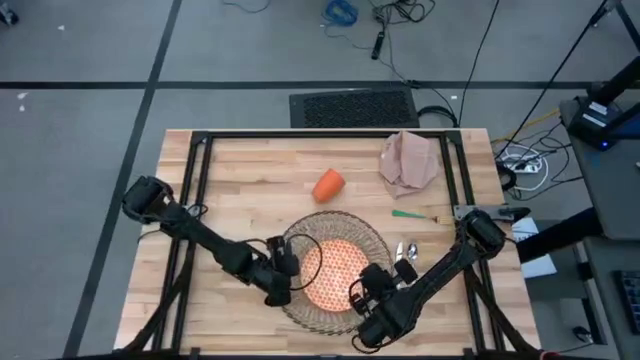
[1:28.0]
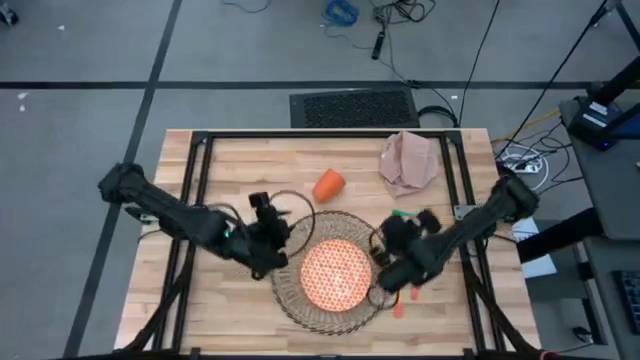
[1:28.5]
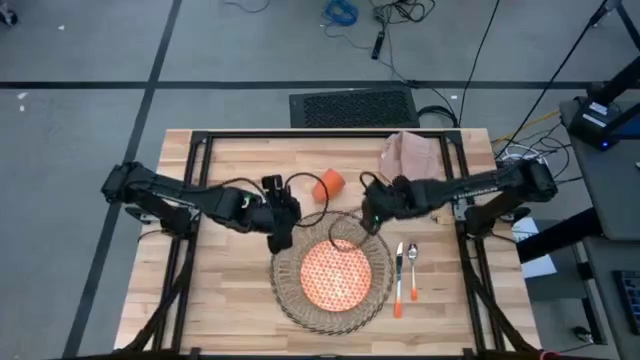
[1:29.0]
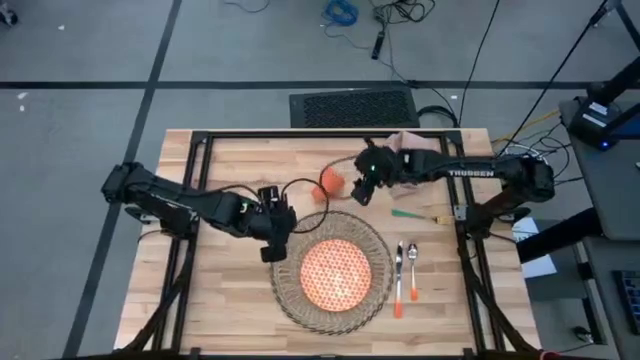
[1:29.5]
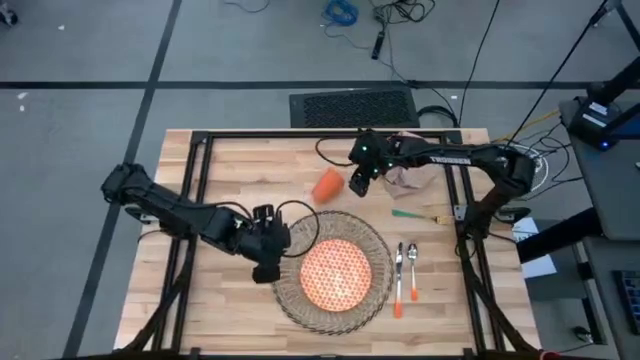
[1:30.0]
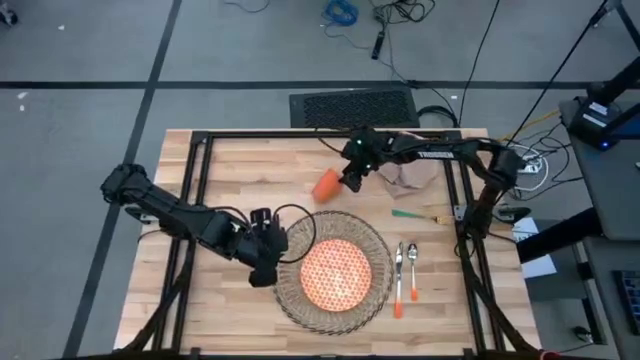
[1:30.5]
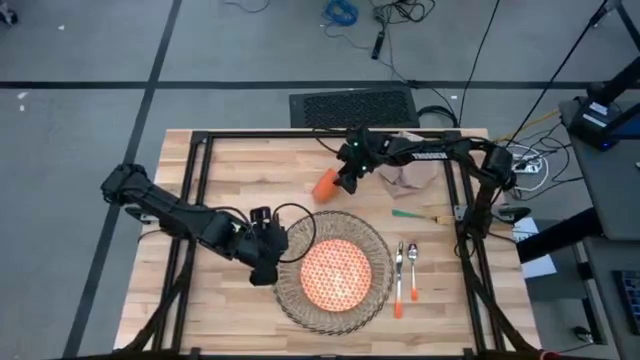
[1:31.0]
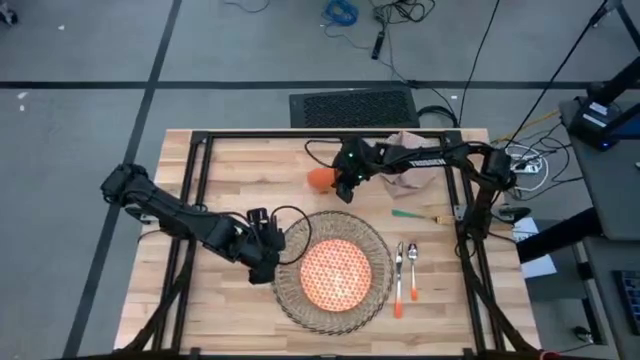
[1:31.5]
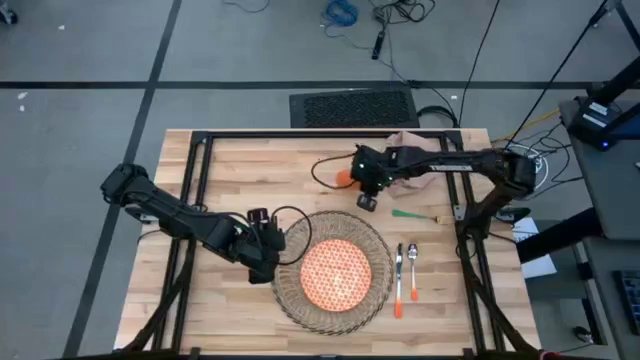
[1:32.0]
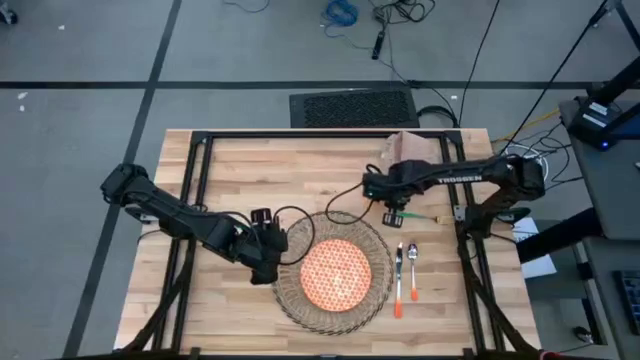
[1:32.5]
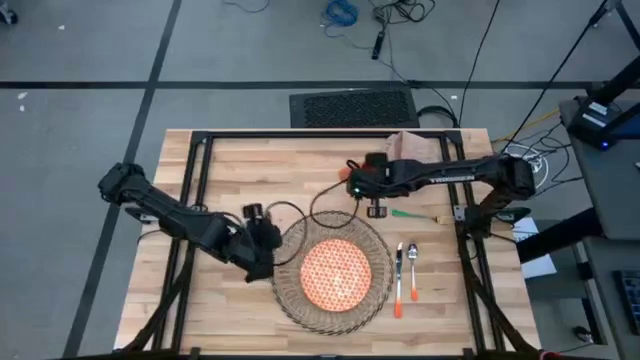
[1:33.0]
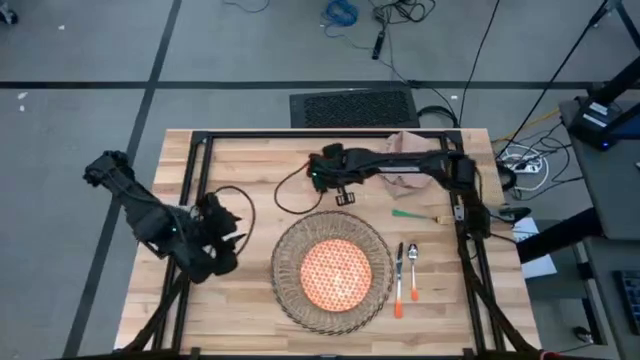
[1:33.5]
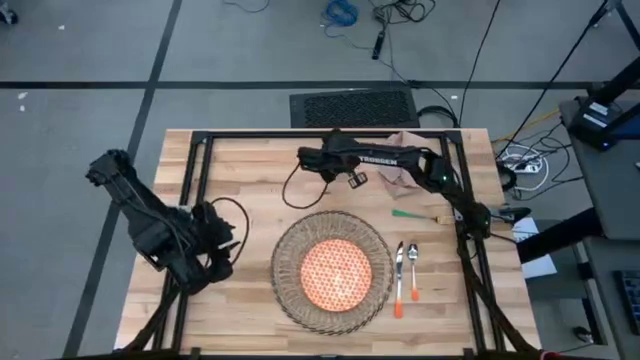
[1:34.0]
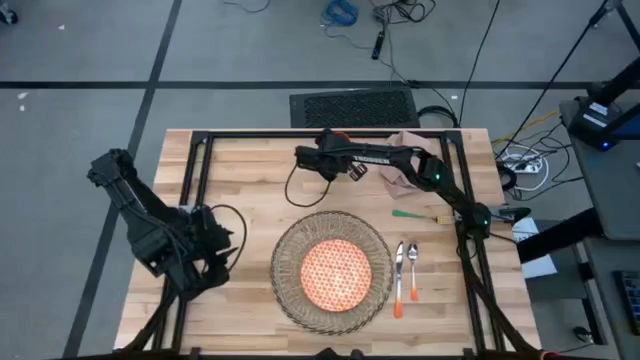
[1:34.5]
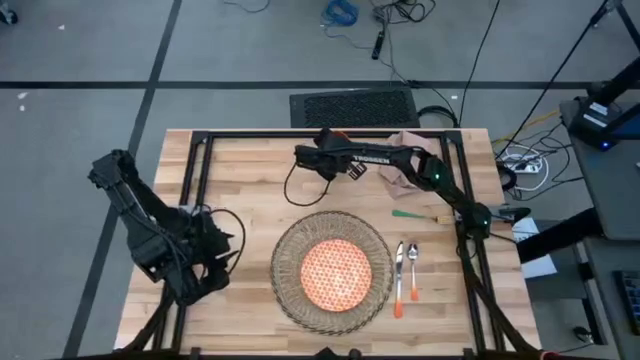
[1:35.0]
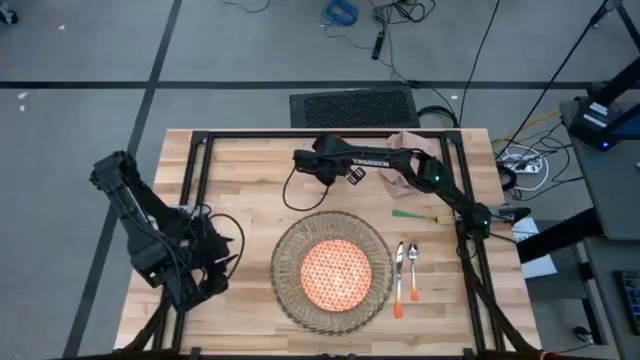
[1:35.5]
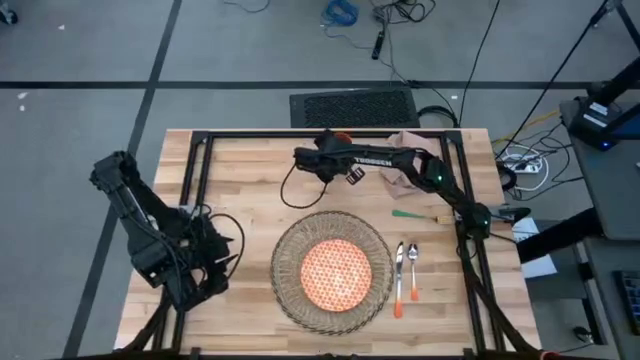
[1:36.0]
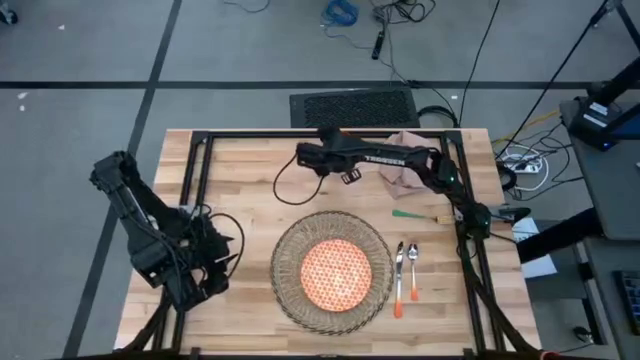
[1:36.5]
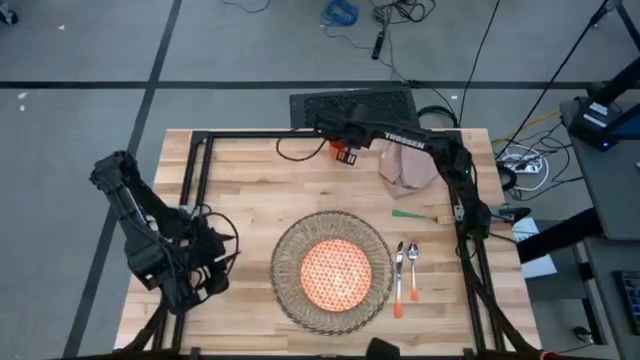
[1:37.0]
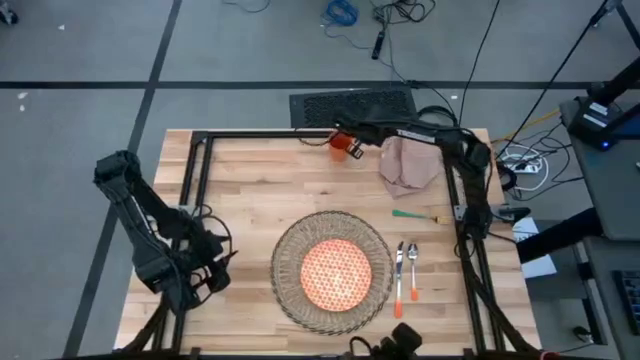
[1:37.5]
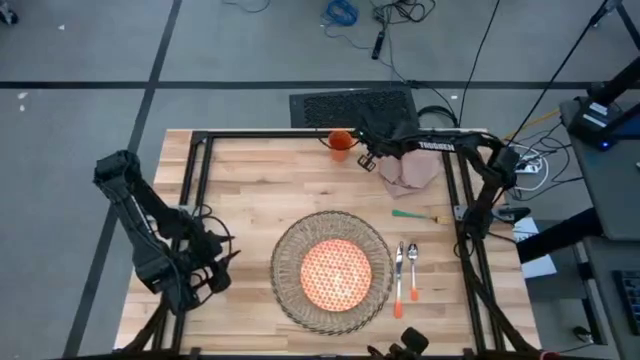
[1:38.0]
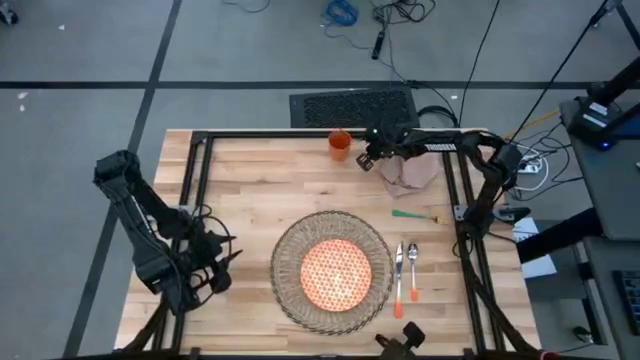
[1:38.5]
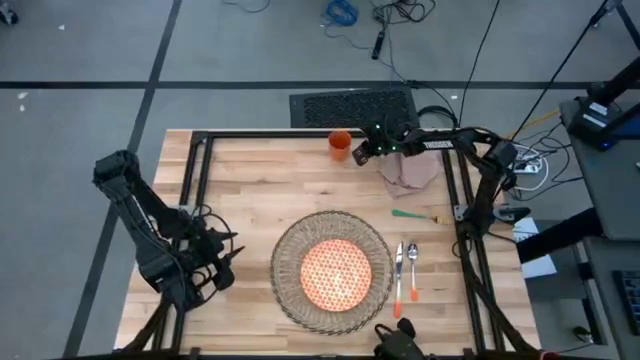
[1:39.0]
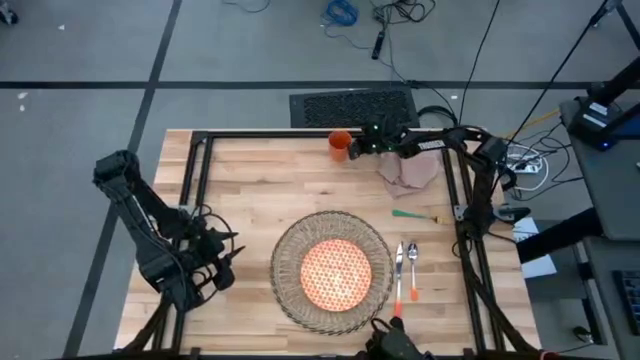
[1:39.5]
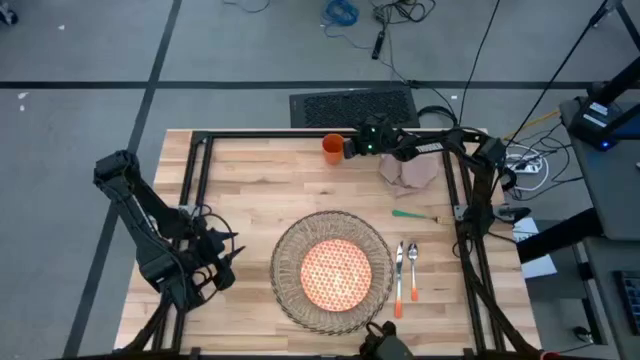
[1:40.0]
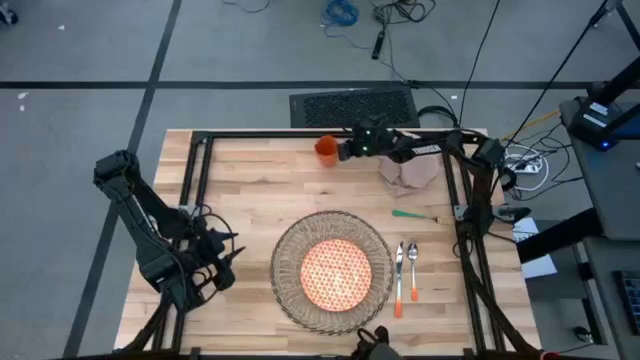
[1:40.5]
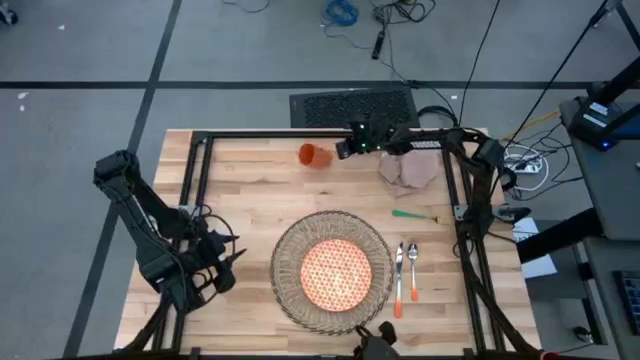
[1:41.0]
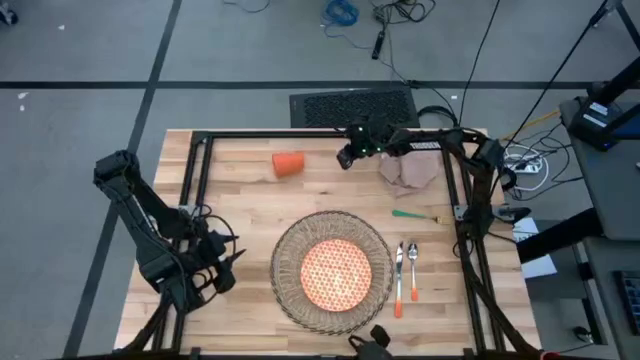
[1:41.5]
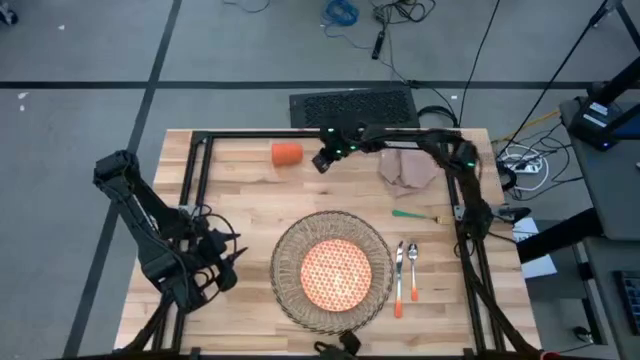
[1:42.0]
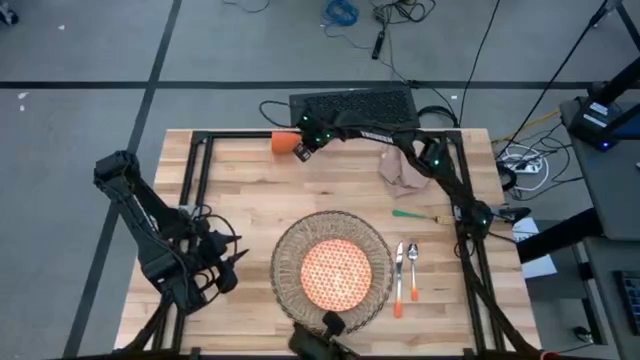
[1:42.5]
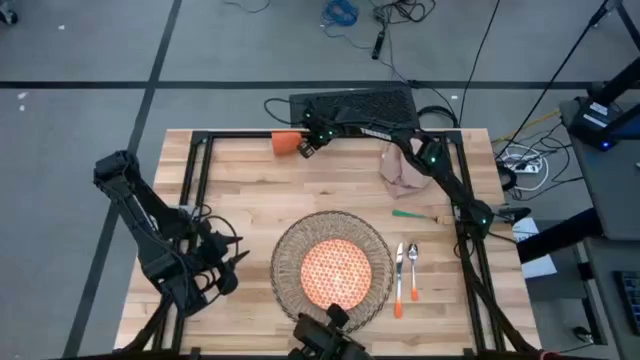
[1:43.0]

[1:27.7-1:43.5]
Task: Set table place
Move the orange cup to the top center of the table

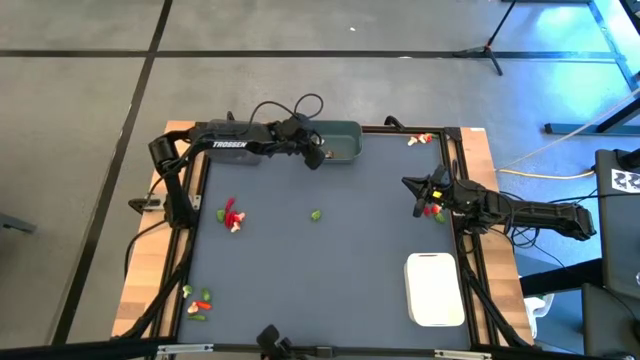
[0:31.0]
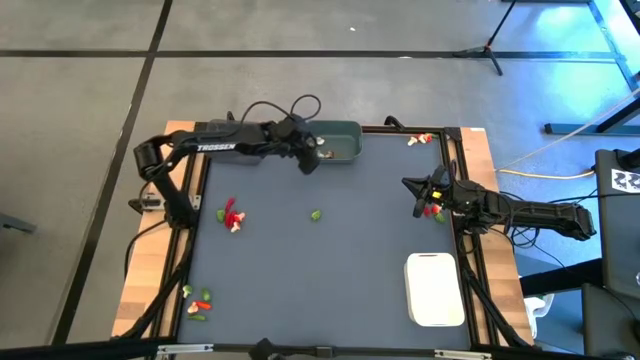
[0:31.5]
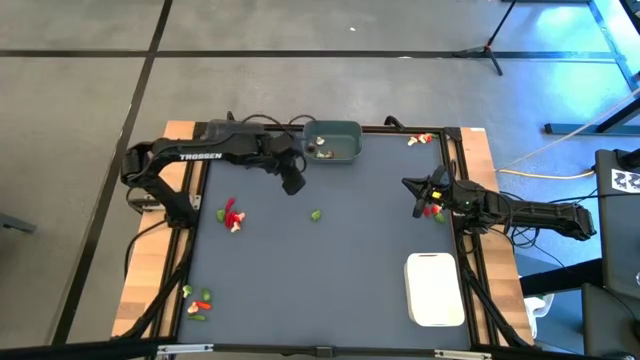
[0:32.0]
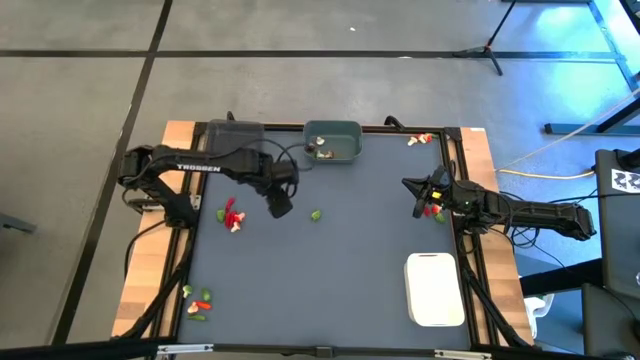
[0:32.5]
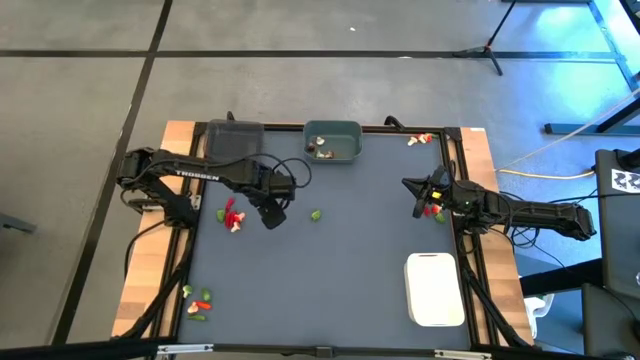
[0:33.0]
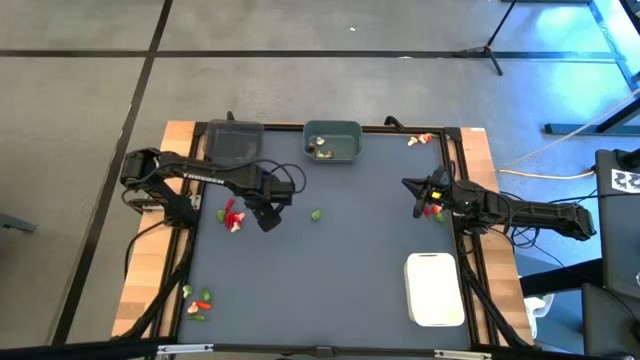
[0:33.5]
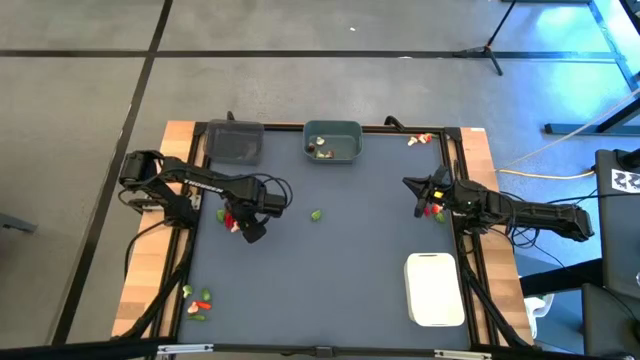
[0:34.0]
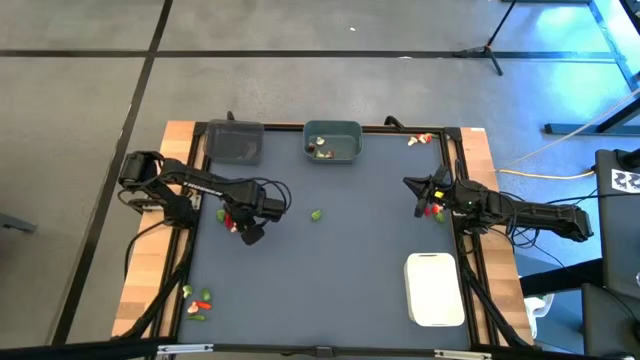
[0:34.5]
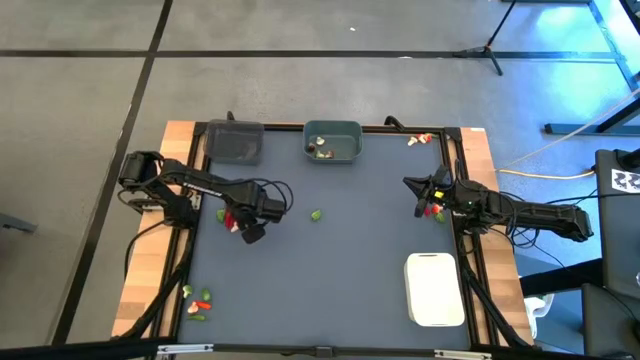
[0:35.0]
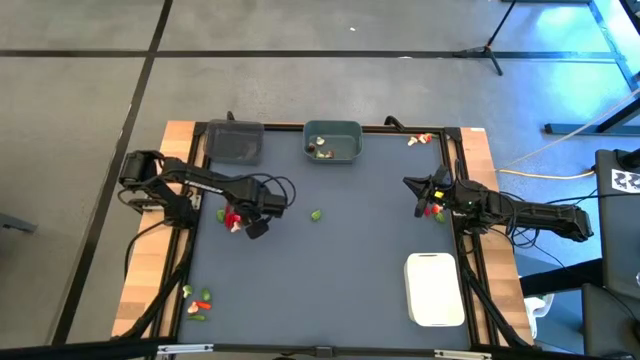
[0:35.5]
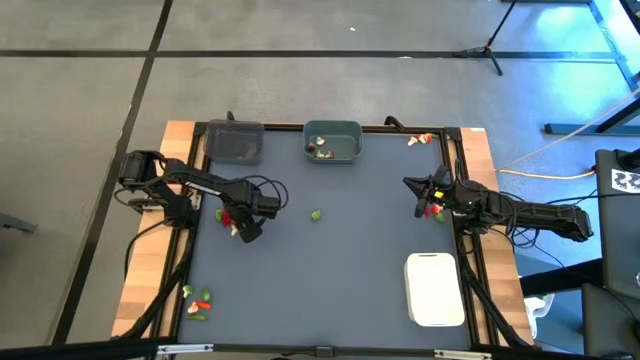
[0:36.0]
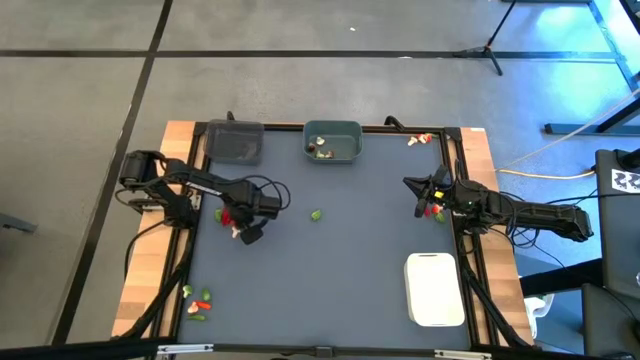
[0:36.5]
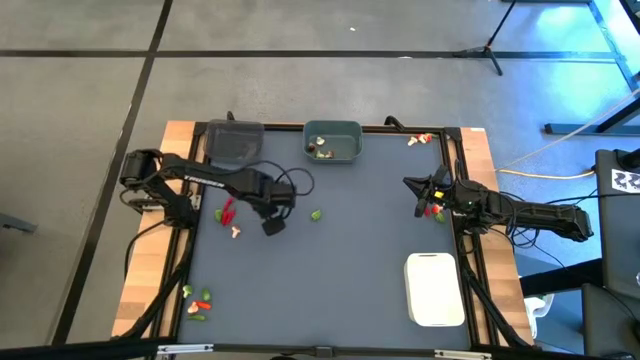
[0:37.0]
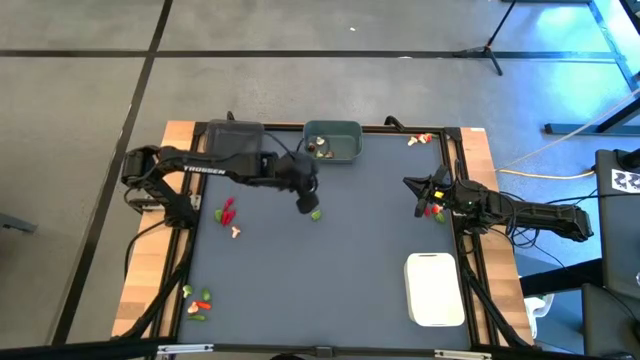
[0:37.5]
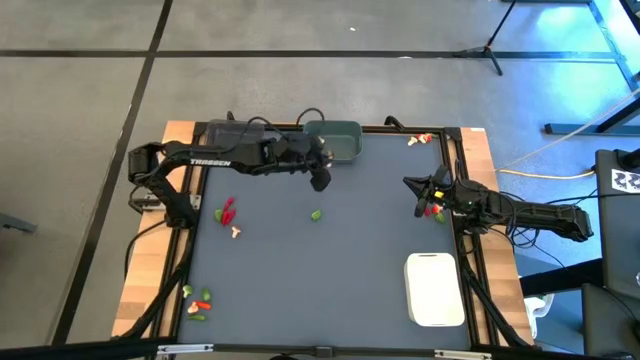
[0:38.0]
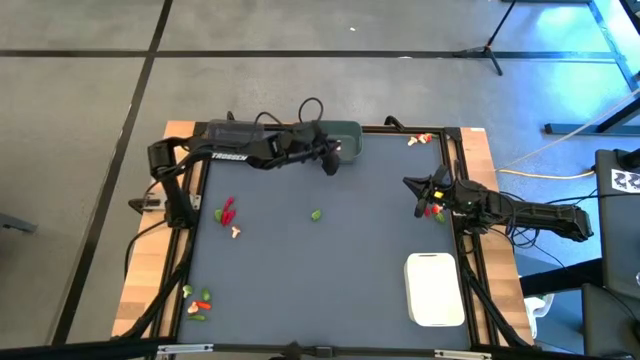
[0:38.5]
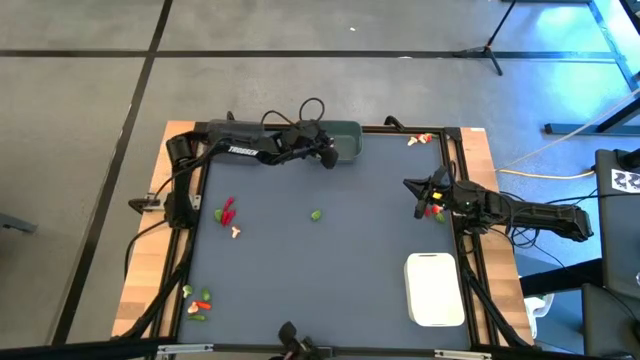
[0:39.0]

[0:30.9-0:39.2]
Task: Sort produce into baskets
Put the red mushroom into the blue bin
